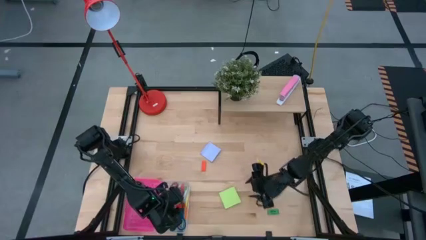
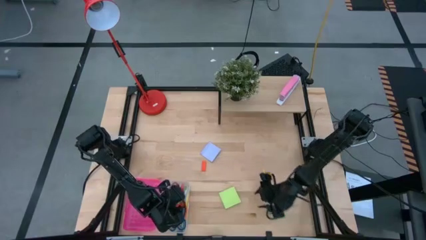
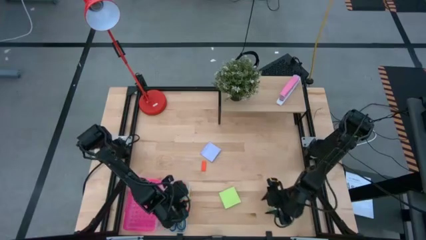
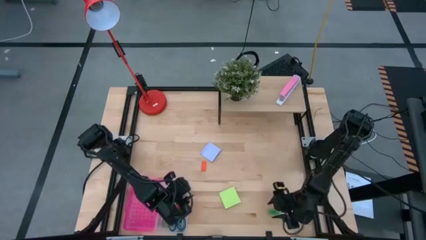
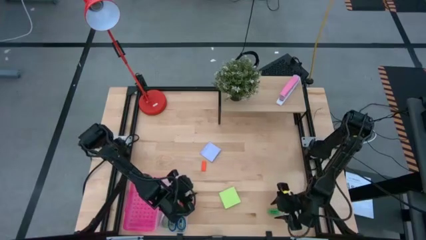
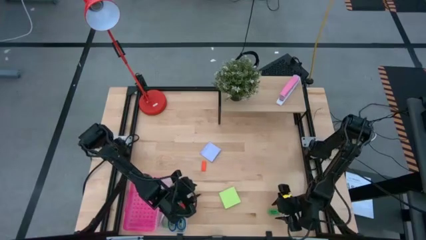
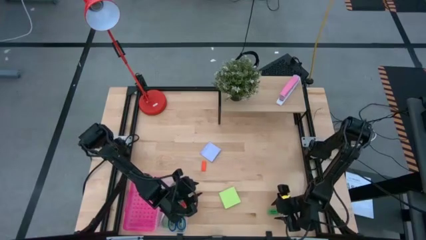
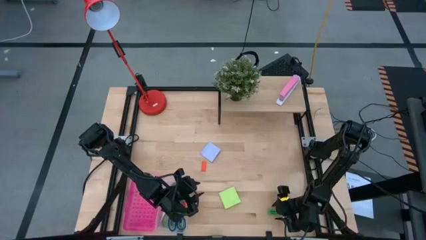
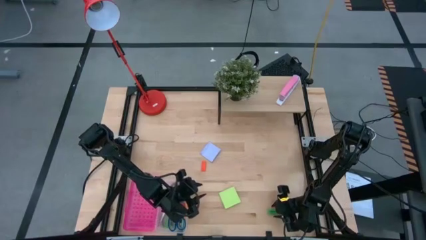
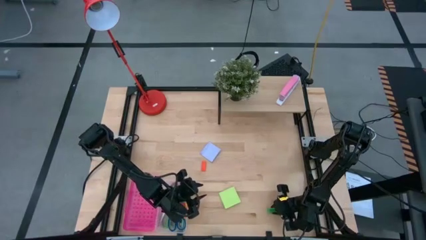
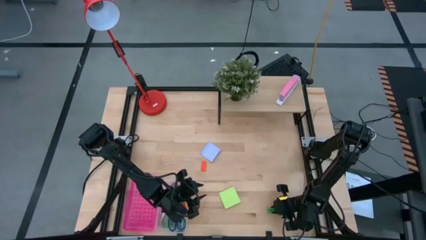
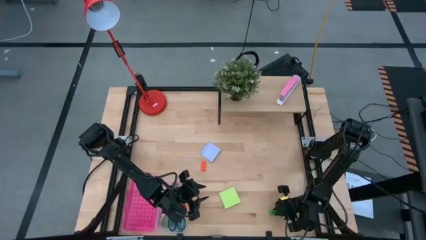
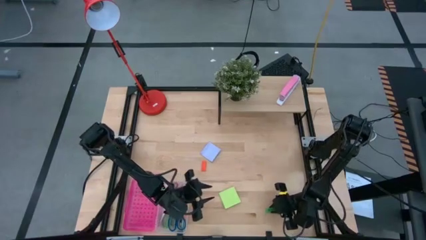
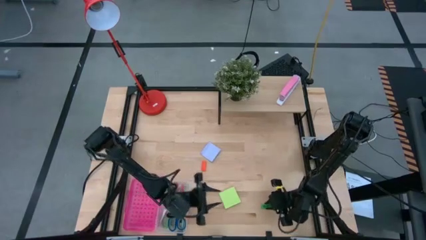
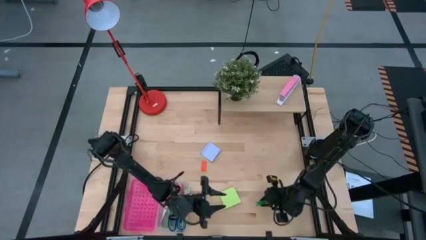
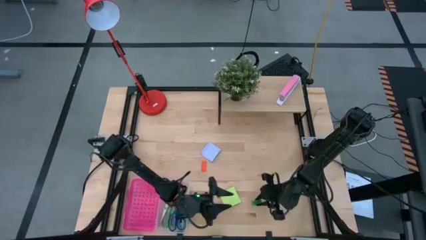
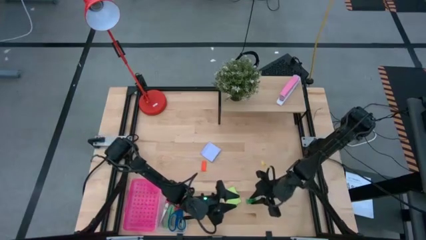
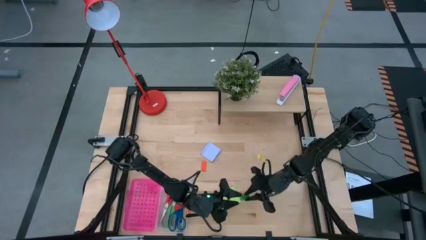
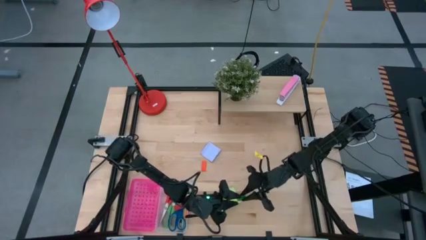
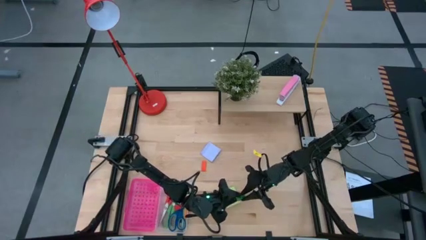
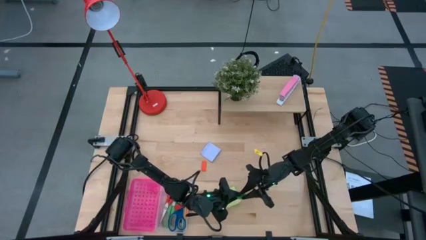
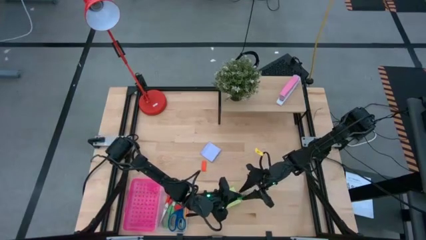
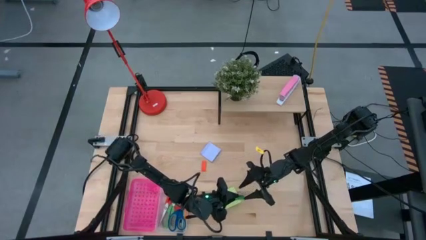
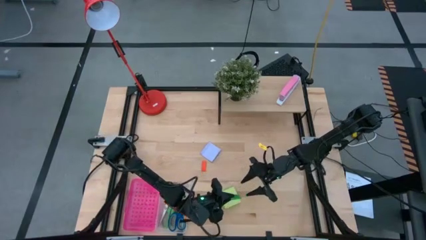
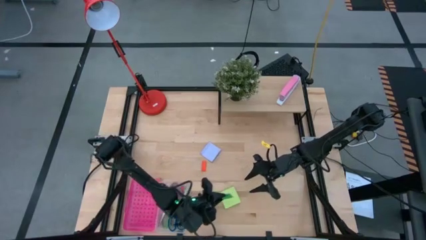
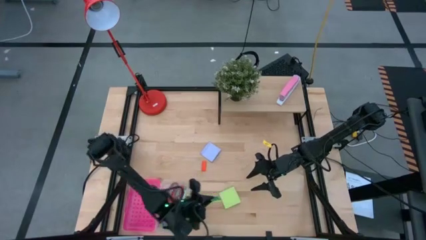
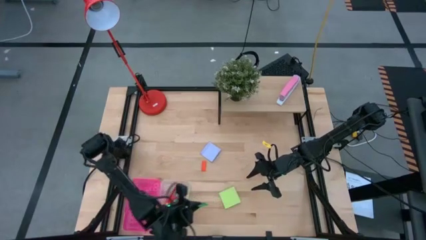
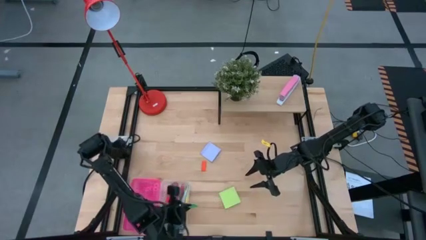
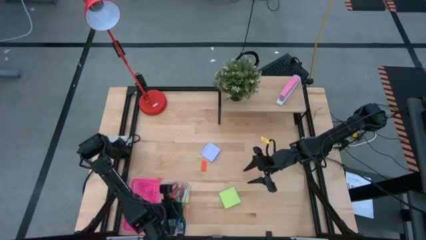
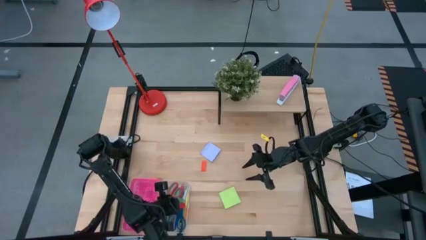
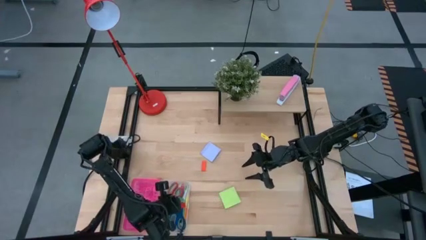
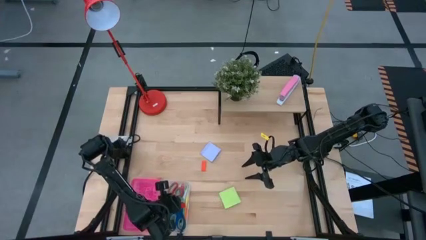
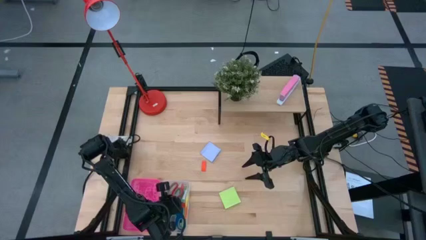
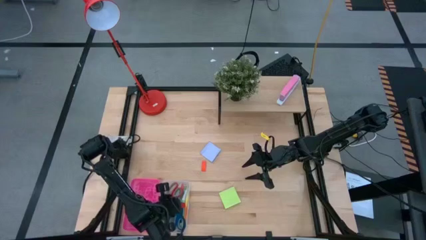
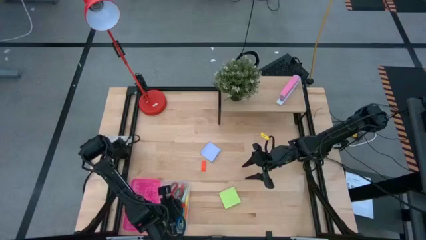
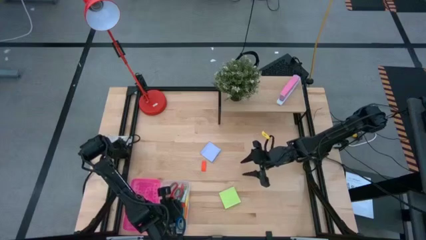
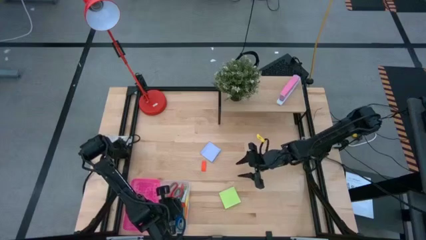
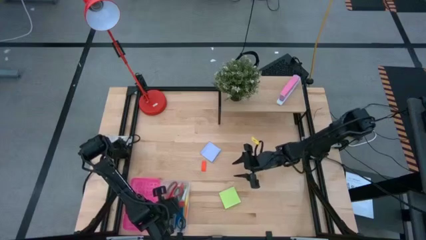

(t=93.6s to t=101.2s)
Task: Pack school essentials
Put the green eraser into the pink supply box

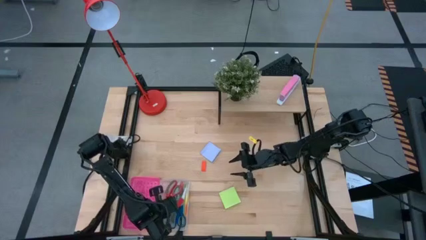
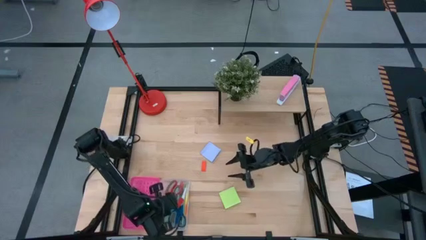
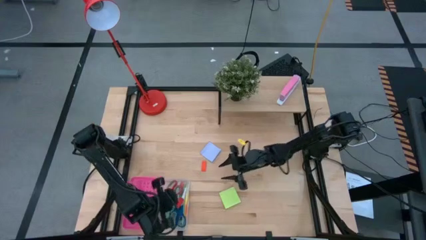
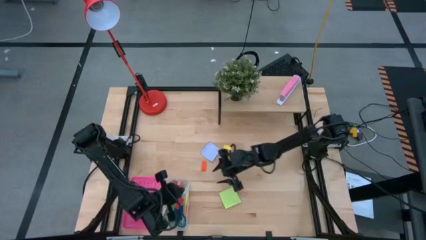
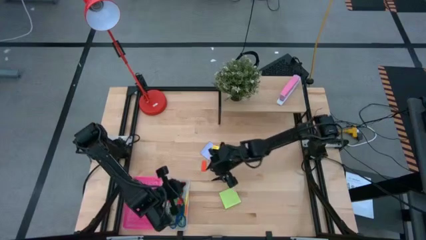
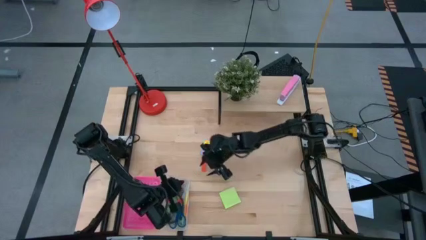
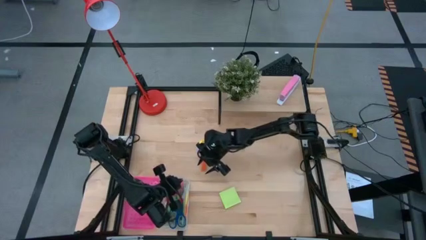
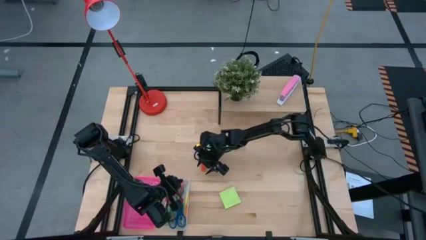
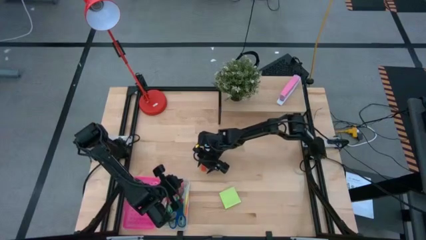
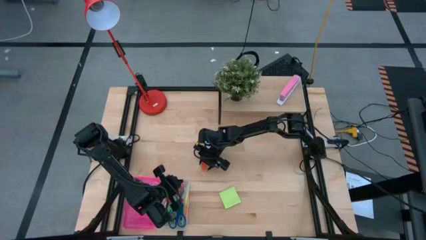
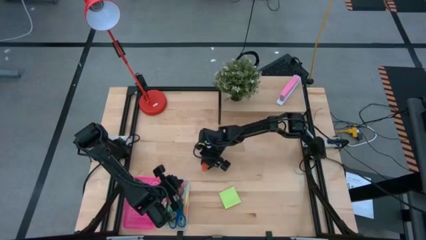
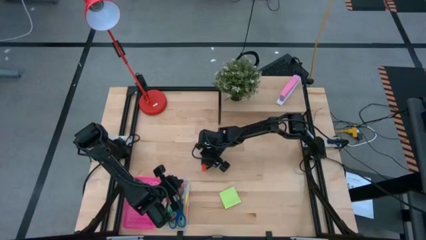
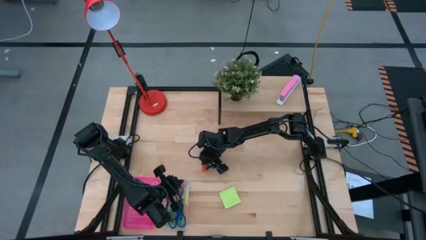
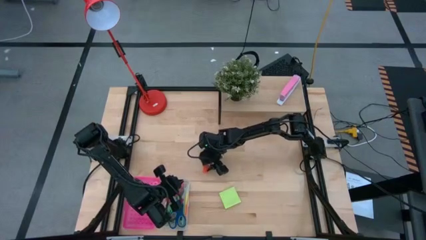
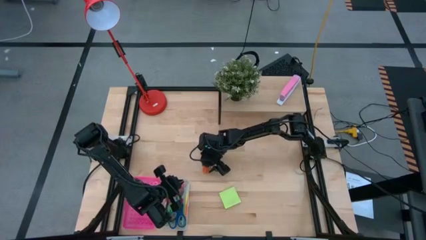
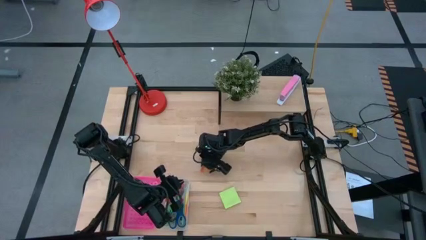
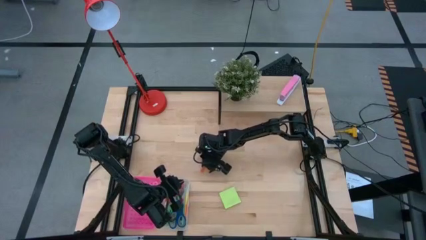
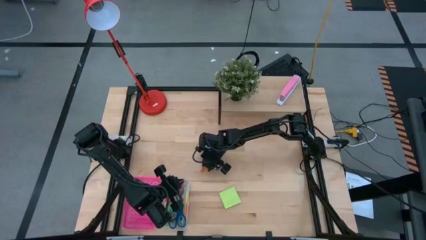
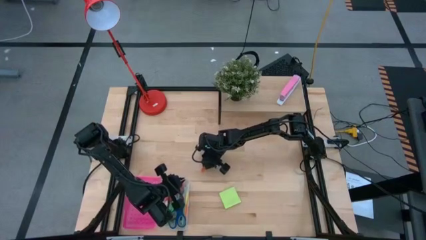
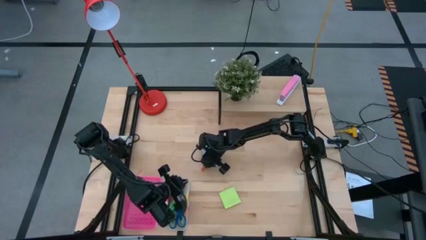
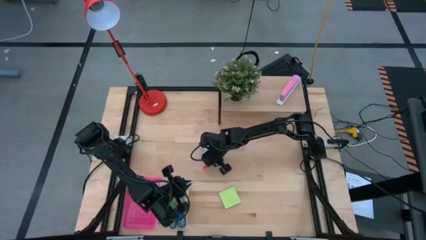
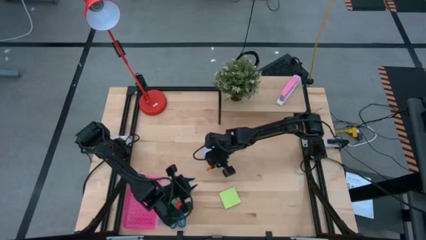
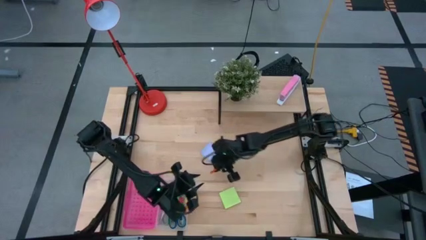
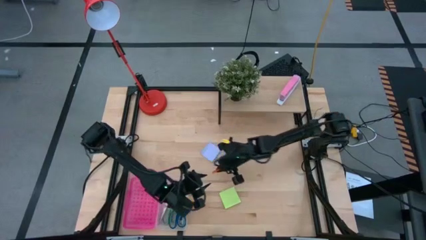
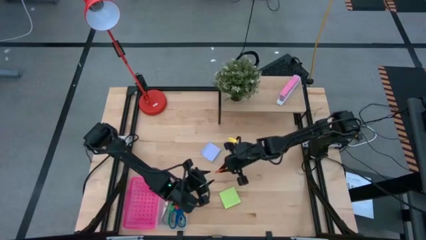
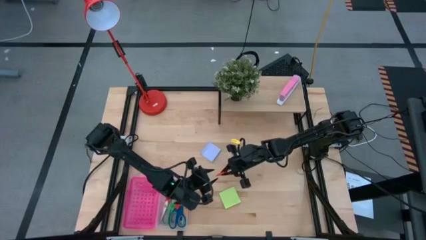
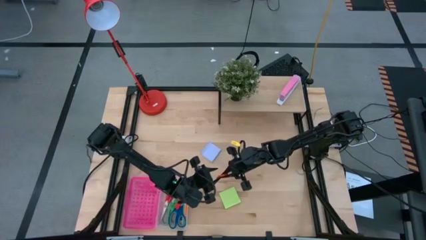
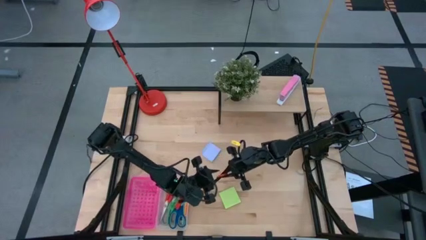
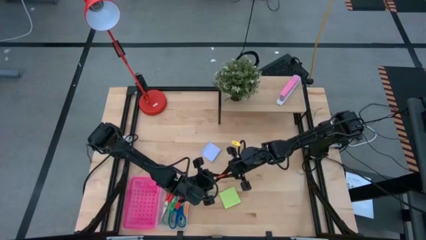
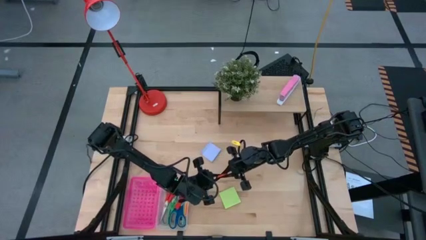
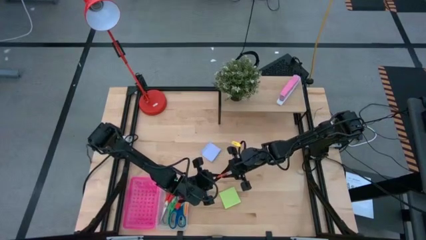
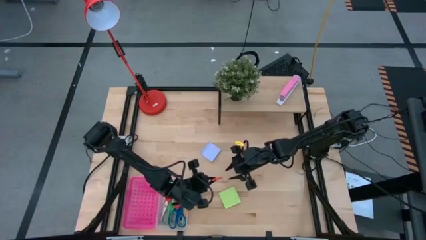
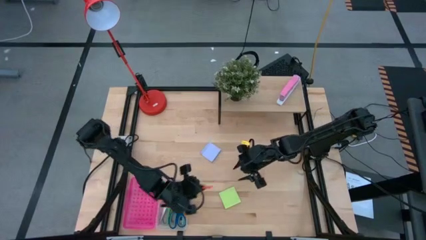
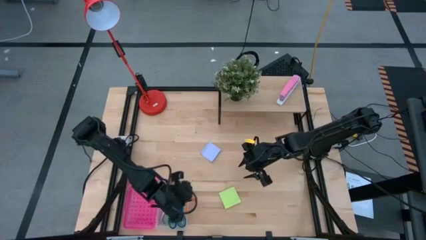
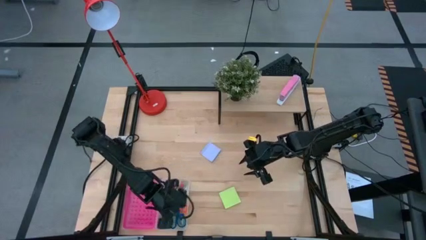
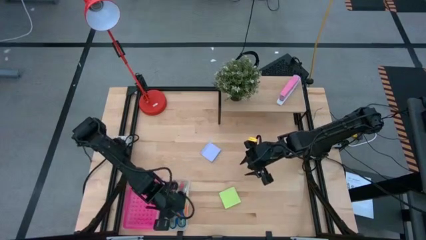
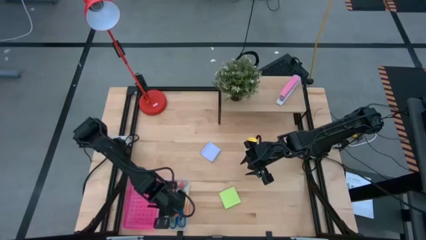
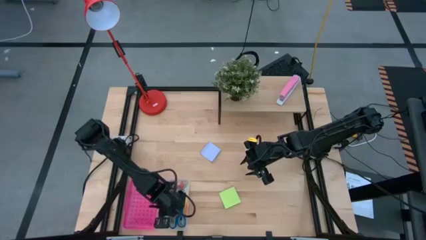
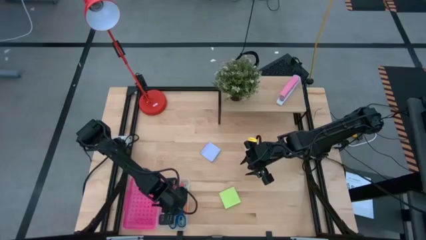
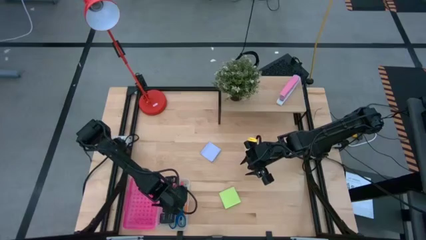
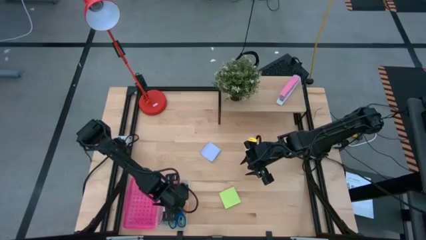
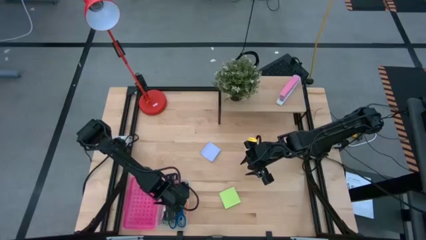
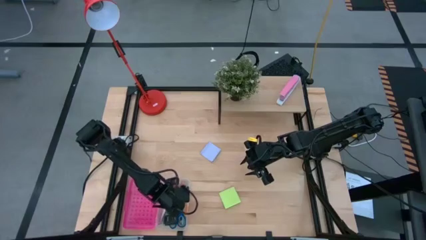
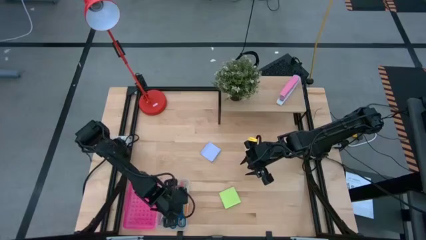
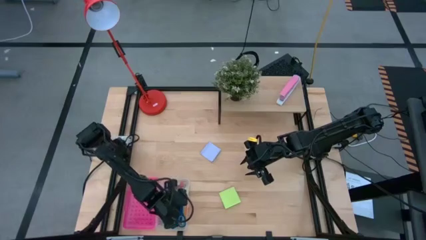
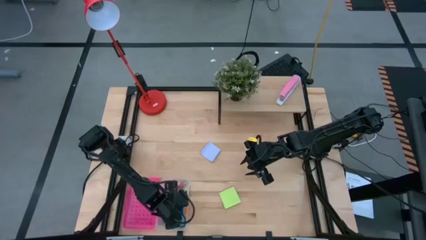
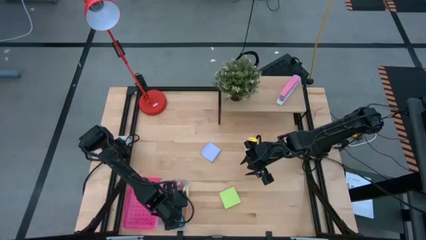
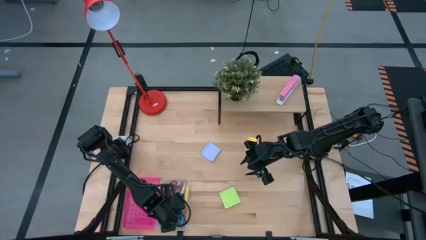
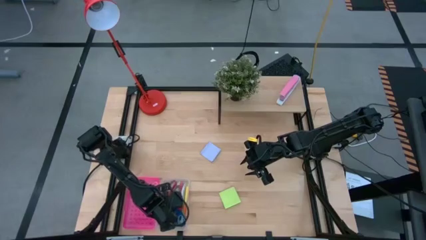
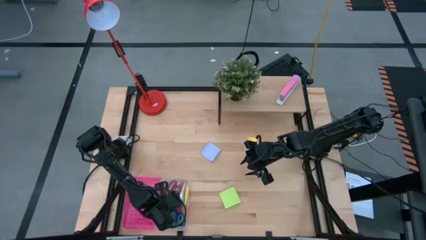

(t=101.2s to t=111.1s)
Put the orange eraser into the pink supply box
